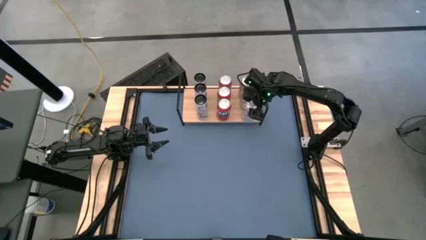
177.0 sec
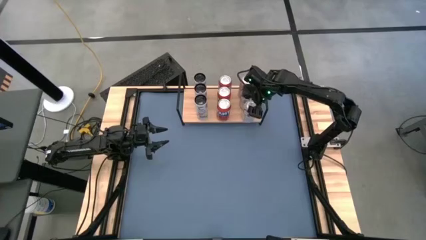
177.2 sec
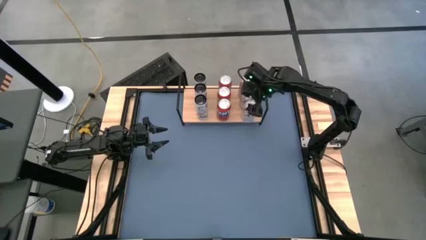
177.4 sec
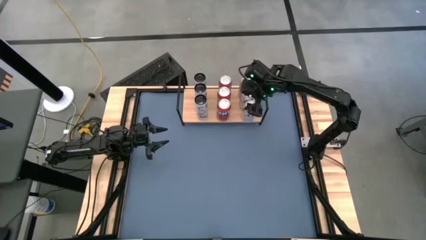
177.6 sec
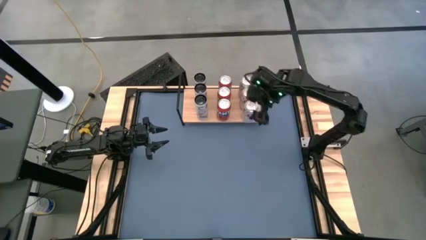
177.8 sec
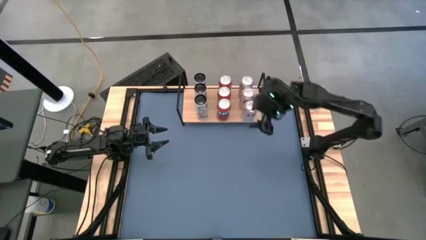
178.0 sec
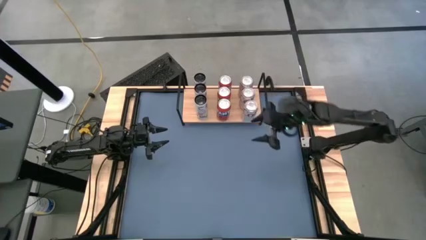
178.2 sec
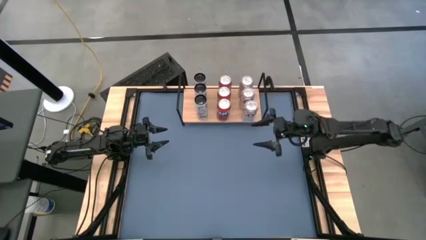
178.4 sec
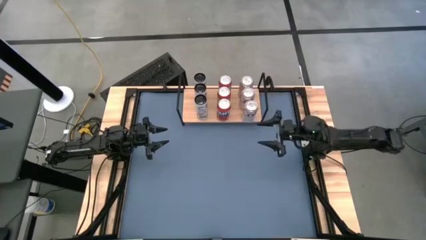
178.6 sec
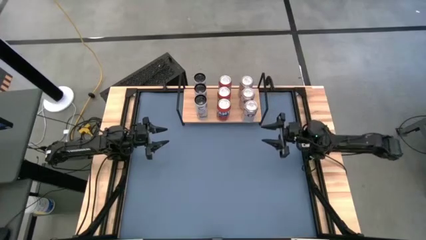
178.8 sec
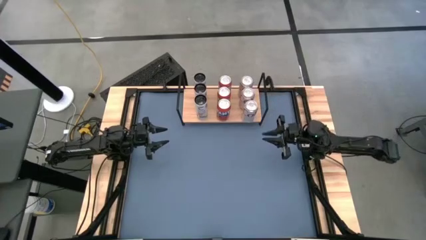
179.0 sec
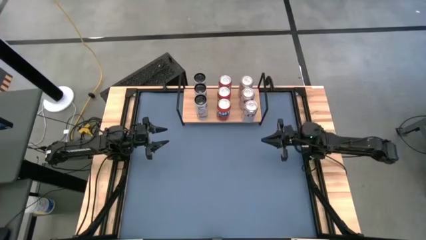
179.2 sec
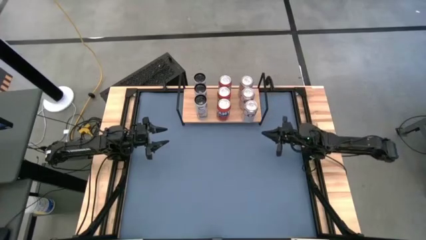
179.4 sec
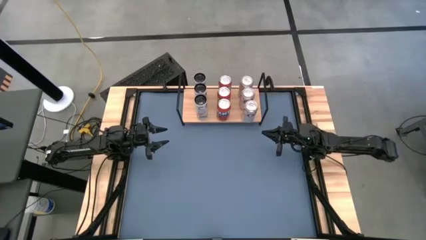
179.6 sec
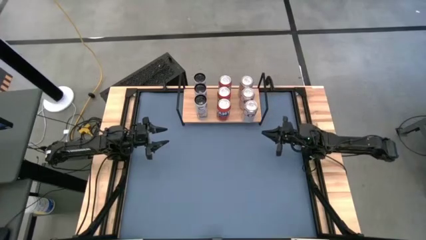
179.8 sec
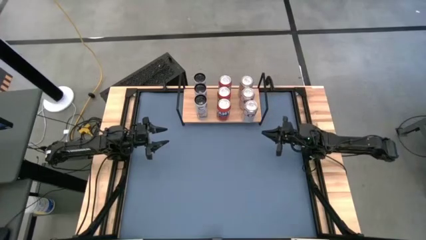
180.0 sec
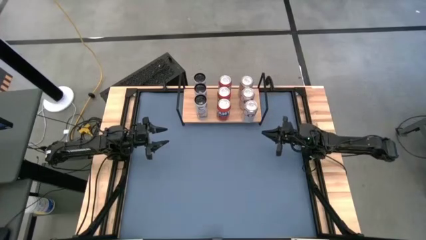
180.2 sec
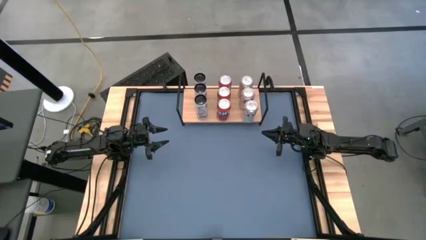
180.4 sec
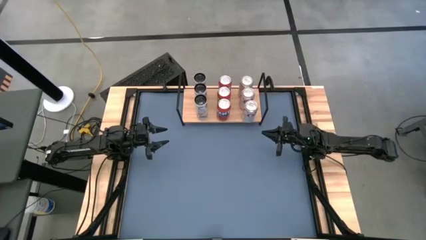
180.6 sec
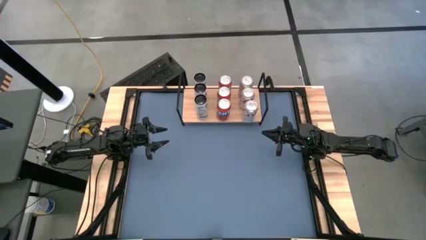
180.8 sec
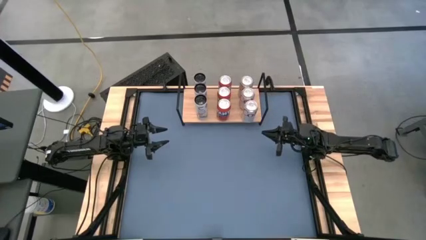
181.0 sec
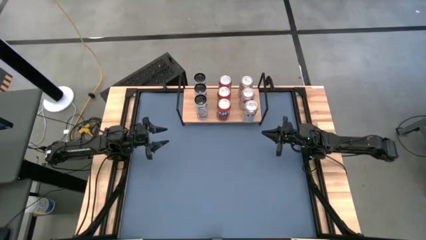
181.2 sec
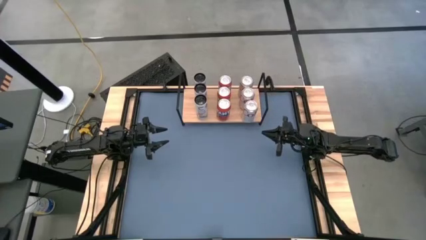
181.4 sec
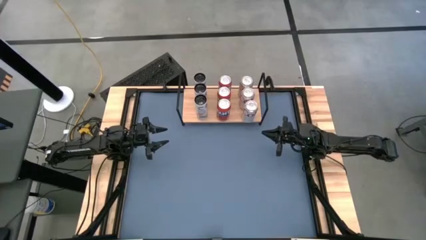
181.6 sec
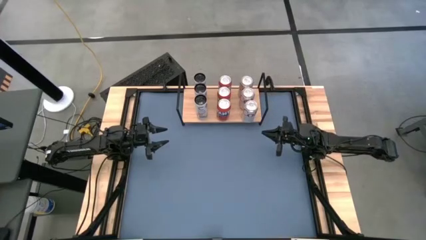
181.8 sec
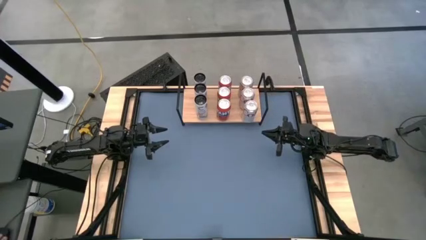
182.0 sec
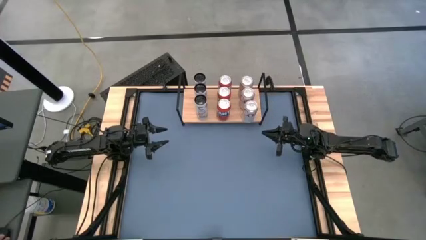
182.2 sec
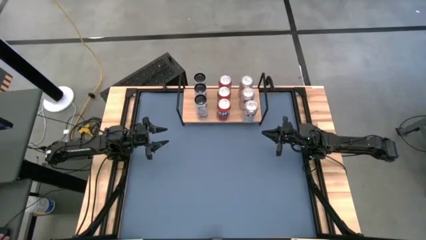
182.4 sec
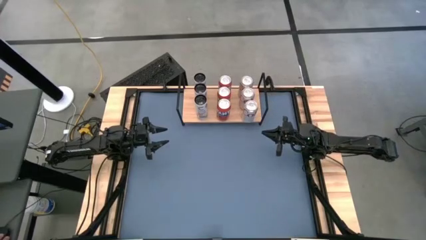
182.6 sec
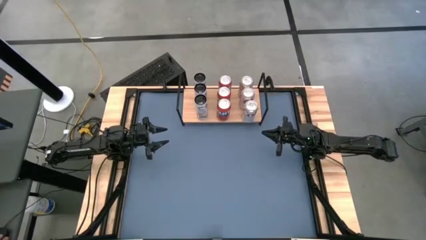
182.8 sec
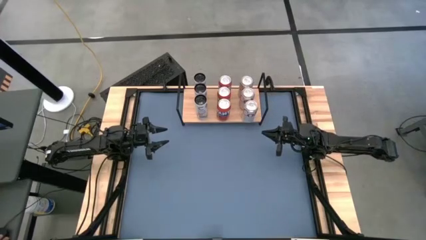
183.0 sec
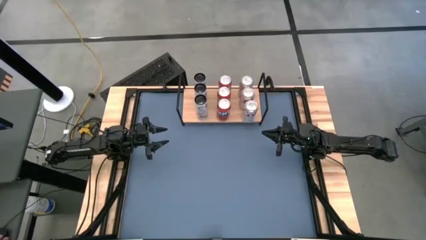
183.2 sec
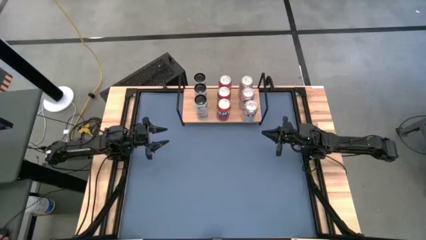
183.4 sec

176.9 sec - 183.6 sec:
Task: Place canned beverage on shelf
Return to Home Position

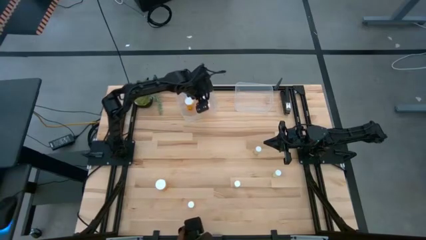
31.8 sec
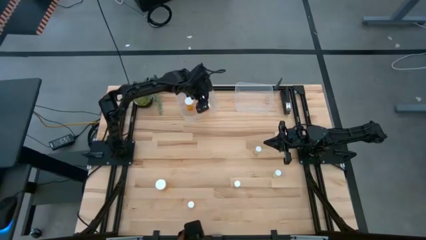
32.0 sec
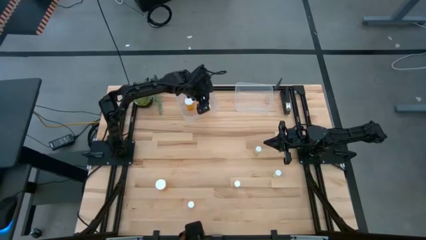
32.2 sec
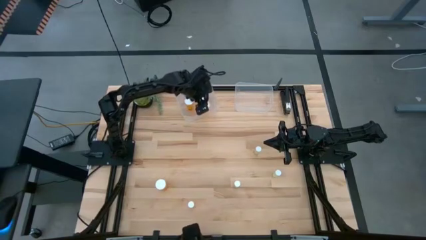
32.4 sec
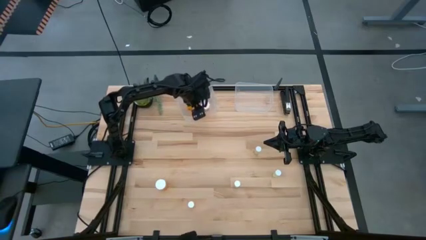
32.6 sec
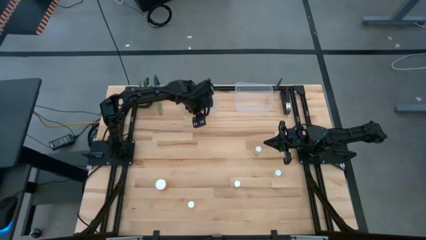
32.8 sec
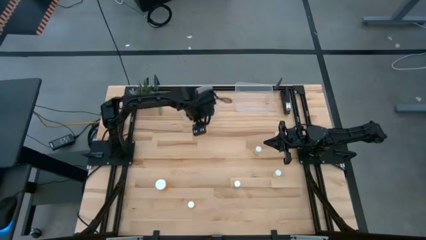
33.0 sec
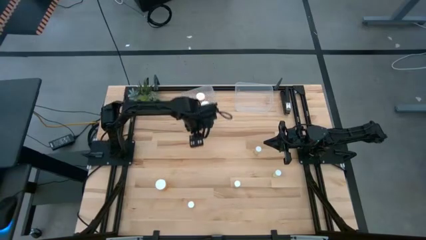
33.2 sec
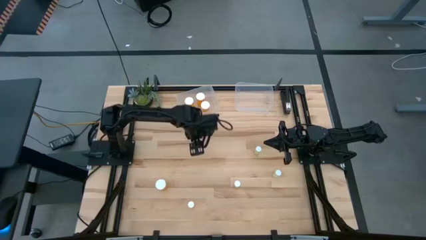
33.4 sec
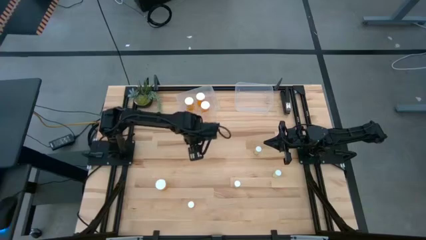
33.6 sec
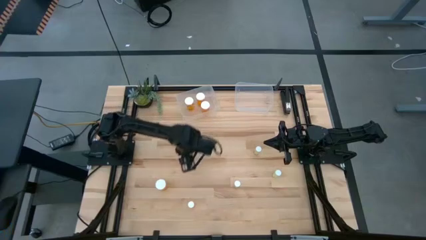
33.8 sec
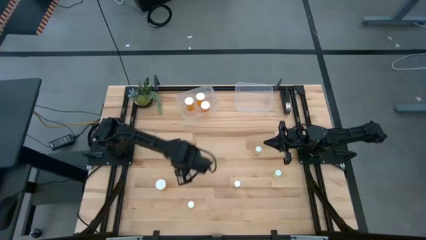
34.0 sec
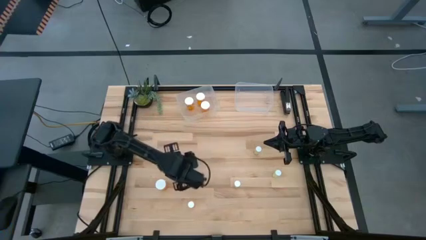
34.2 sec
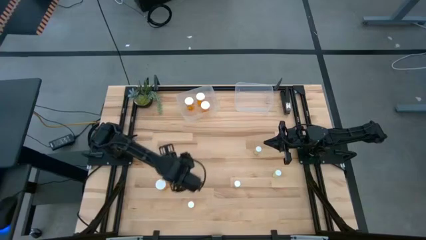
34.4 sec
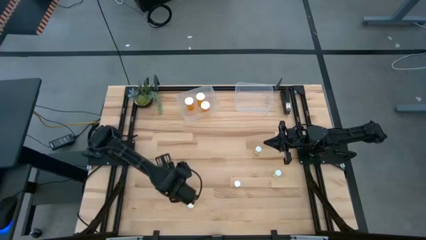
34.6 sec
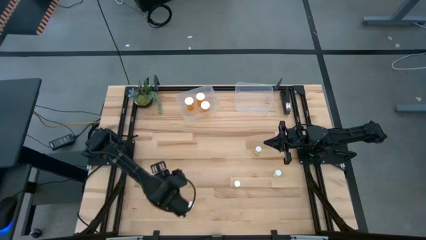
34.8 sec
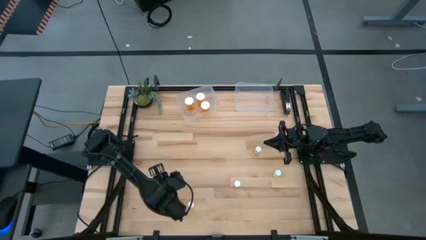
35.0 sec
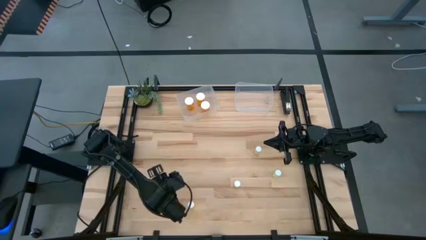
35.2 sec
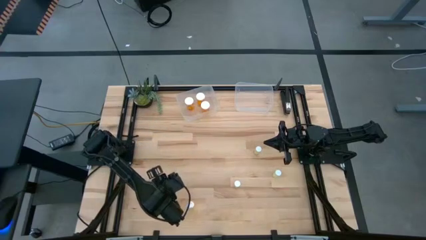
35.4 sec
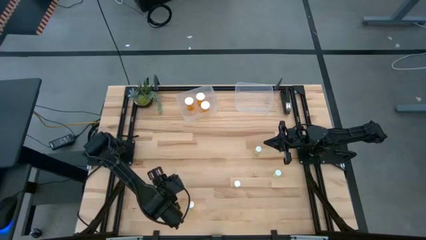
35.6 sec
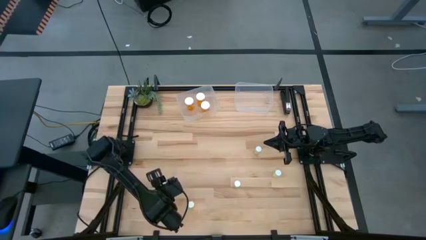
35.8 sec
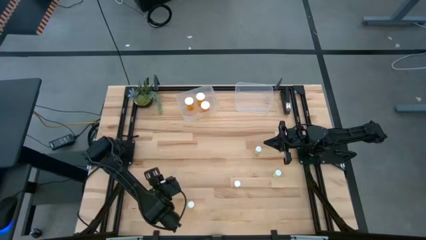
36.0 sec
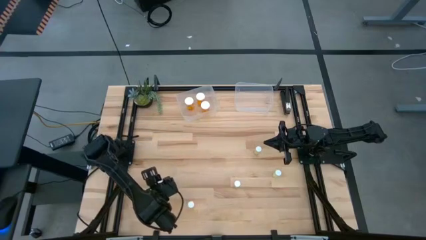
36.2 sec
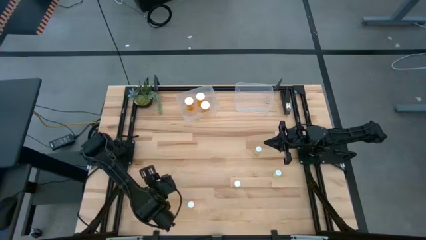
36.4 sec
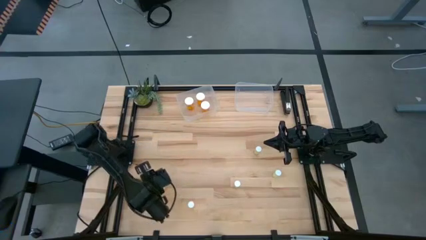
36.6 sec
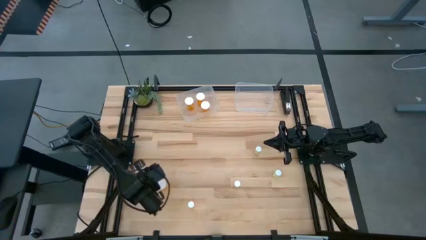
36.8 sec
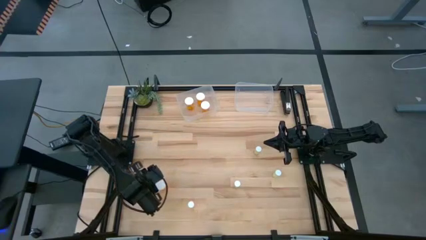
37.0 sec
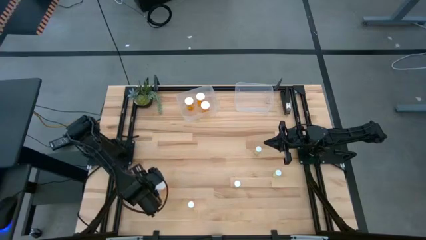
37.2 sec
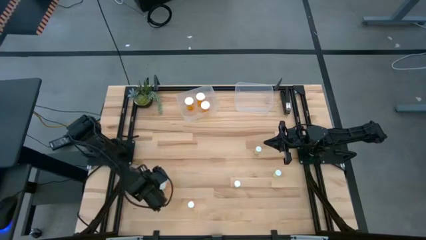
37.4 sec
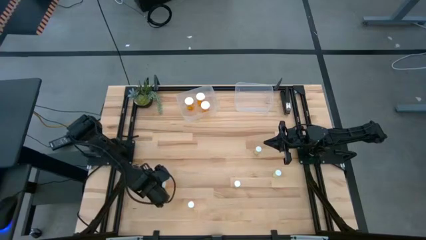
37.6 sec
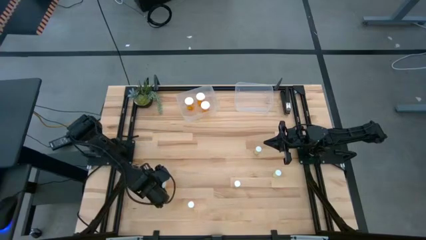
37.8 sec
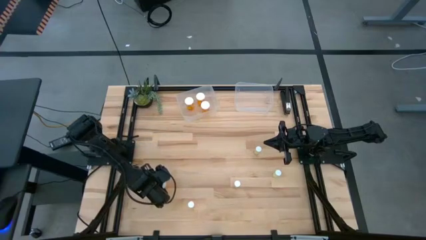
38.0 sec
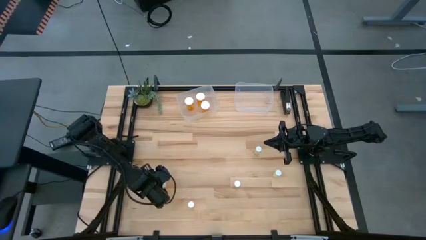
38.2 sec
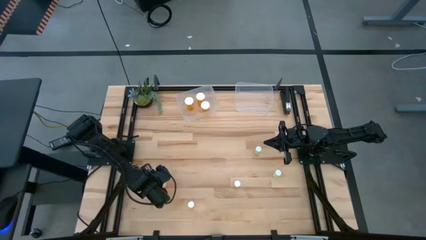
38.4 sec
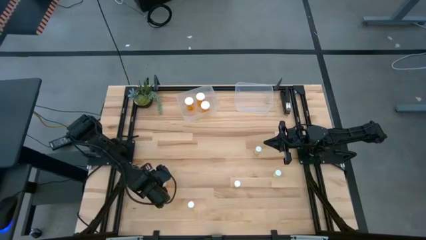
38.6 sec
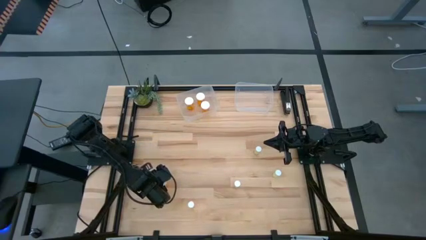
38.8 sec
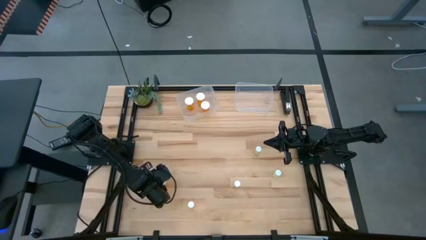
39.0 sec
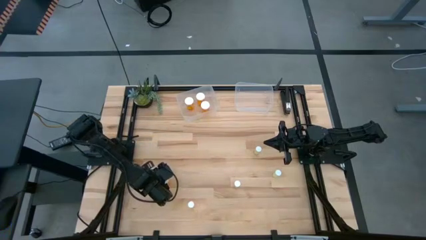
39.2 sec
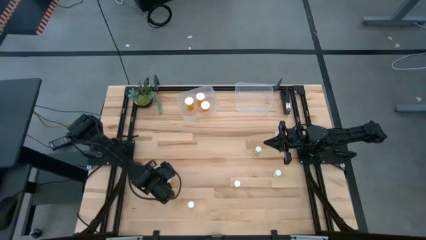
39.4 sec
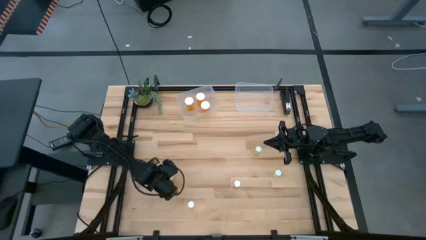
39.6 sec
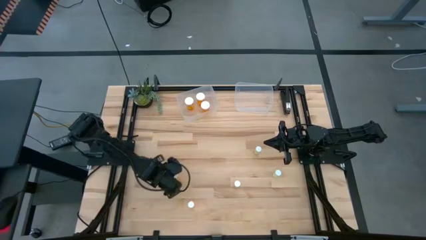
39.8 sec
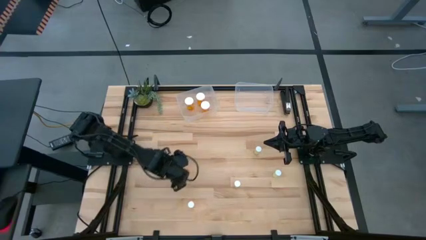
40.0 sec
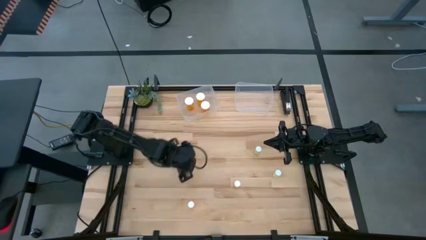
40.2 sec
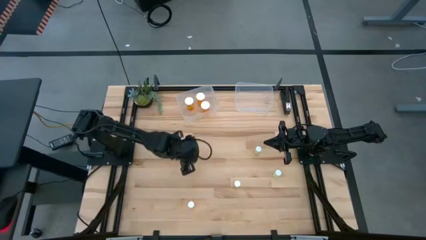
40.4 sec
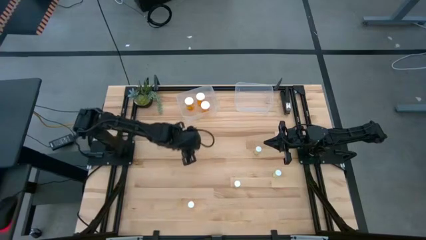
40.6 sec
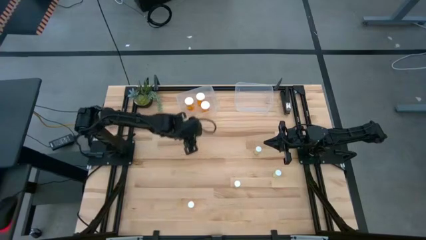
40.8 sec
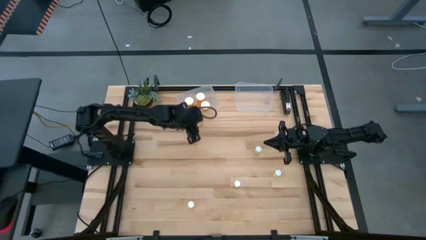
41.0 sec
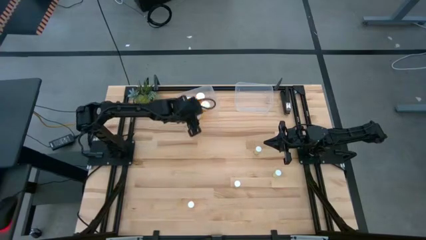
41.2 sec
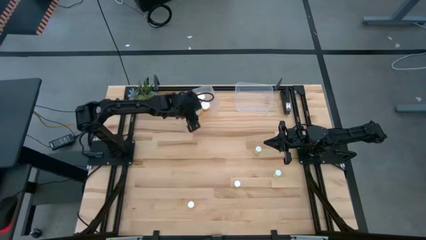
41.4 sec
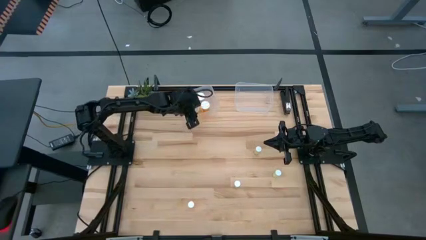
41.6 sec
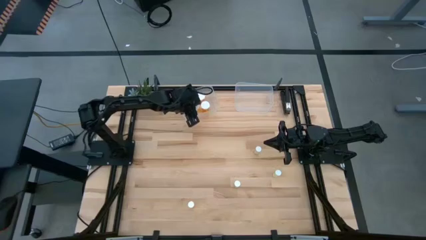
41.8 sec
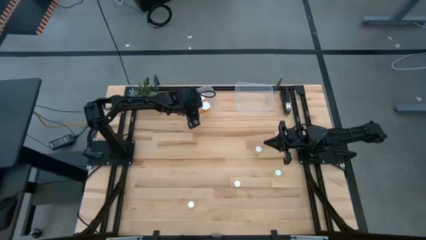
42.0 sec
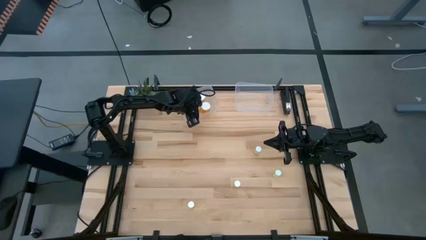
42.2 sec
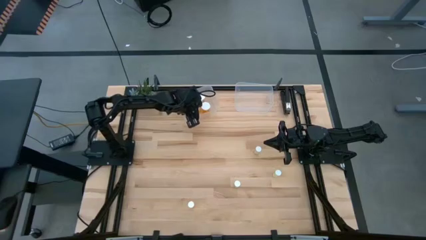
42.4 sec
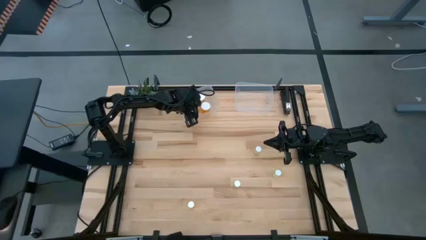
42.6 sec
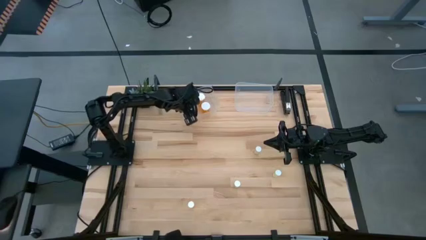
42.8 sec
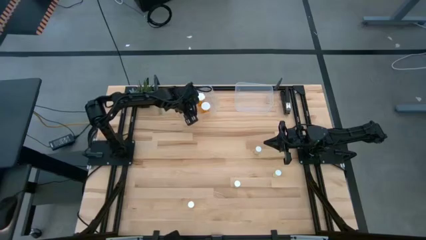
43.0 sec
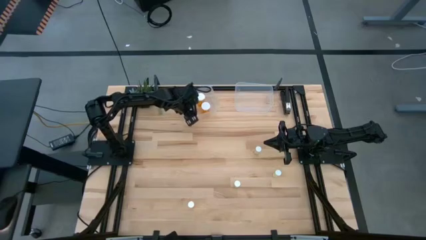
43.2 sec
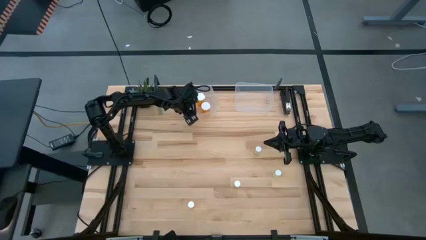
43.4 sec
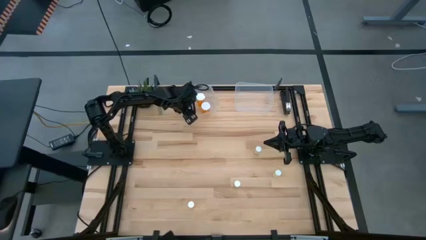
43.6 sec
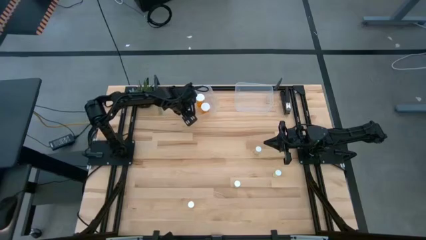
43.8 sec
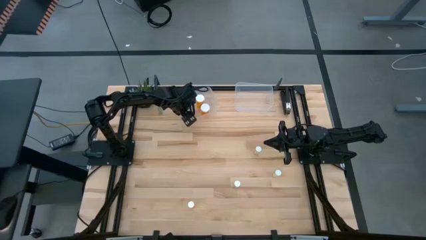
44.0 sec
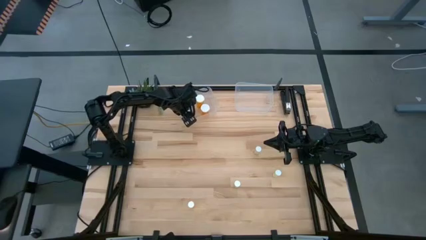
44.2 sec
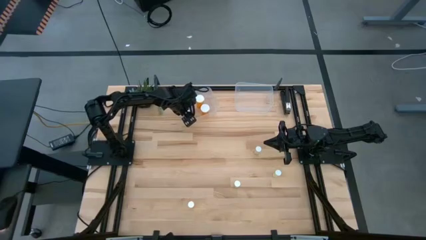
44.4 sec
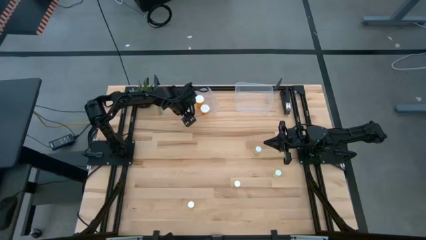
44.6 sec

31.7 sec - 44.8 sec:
Task: Pick and place medicine bottles into bin by pill shape (circle, oval)
Put the orange capsule bottle into the left transparent bin
